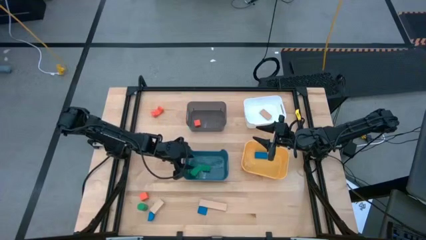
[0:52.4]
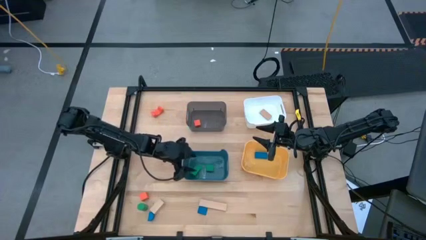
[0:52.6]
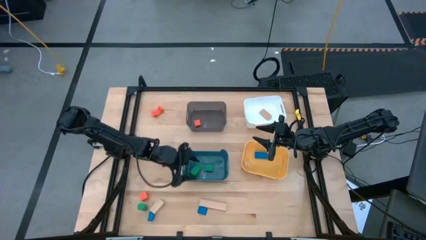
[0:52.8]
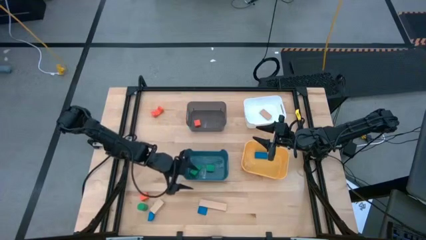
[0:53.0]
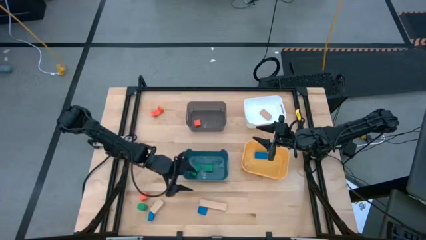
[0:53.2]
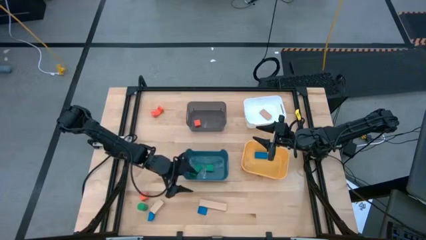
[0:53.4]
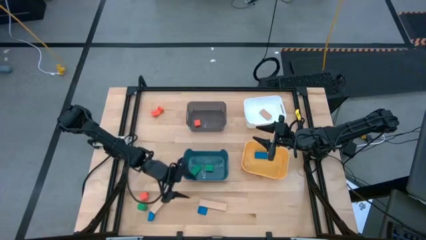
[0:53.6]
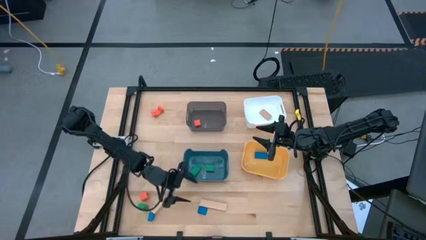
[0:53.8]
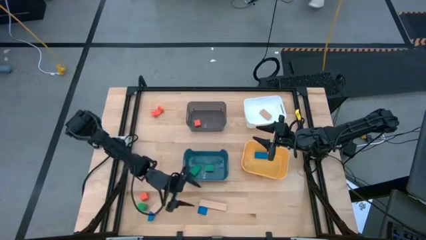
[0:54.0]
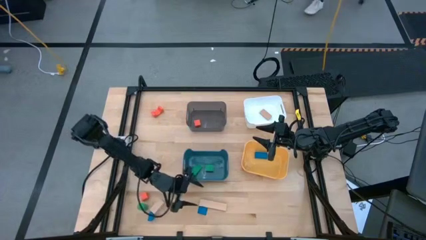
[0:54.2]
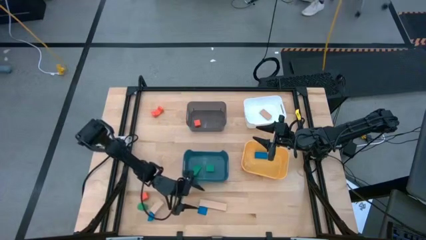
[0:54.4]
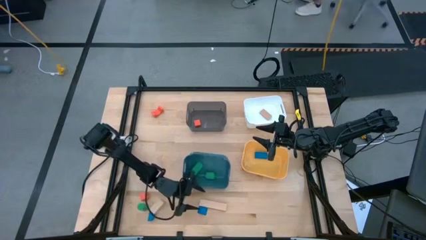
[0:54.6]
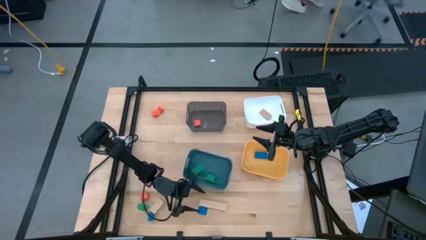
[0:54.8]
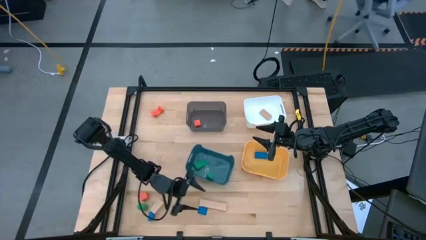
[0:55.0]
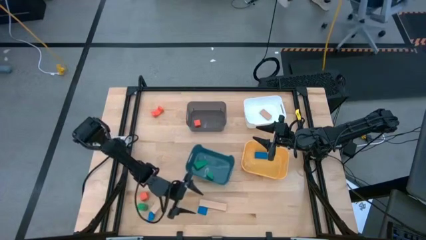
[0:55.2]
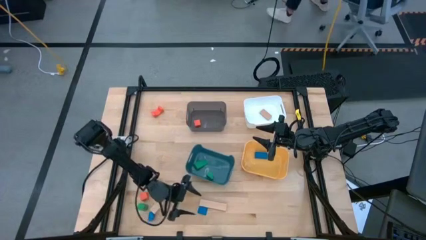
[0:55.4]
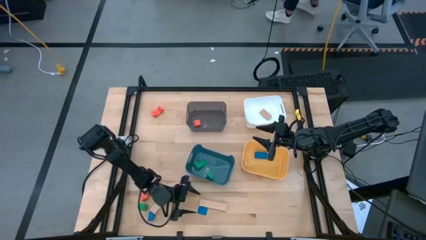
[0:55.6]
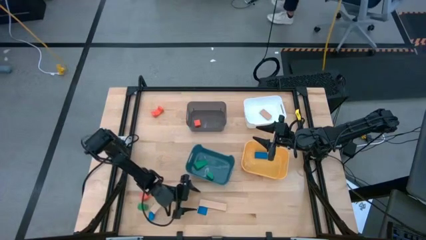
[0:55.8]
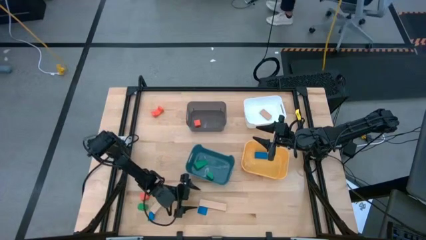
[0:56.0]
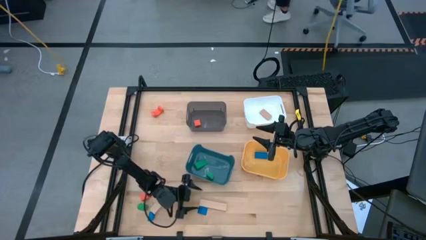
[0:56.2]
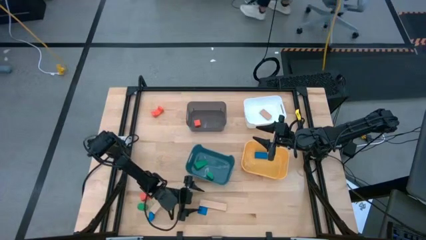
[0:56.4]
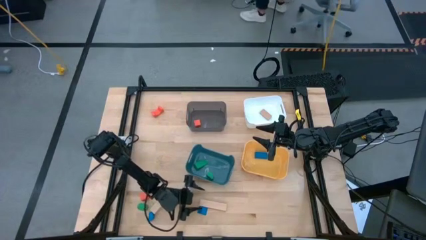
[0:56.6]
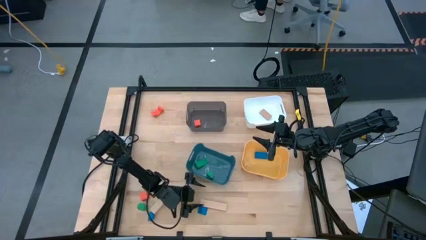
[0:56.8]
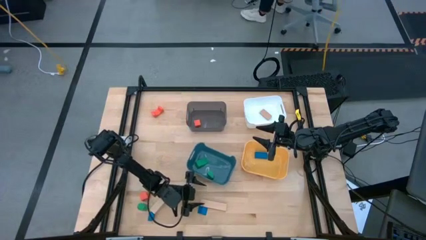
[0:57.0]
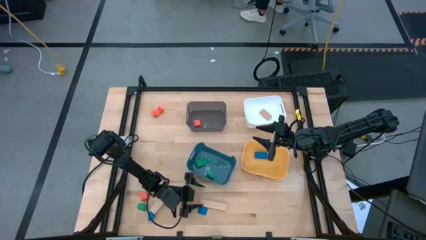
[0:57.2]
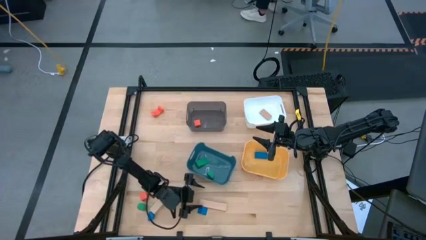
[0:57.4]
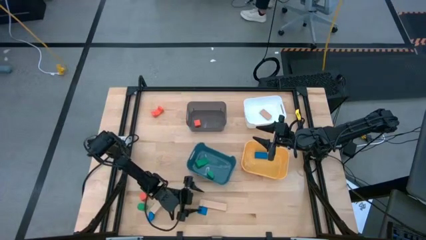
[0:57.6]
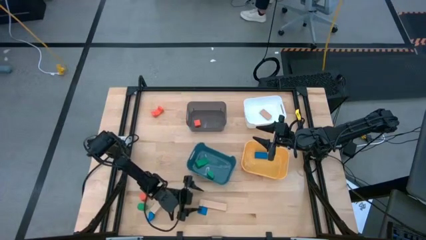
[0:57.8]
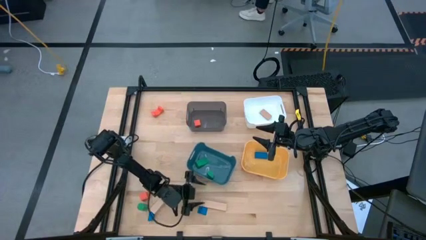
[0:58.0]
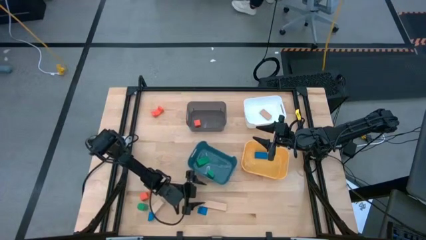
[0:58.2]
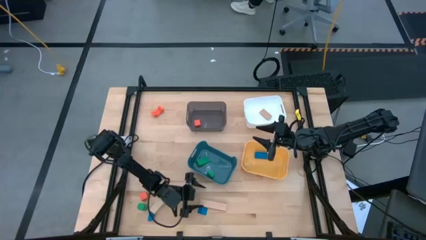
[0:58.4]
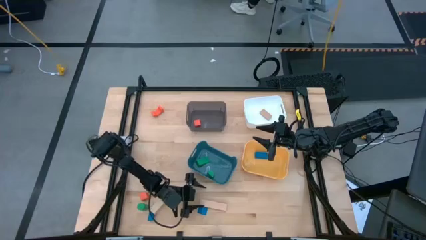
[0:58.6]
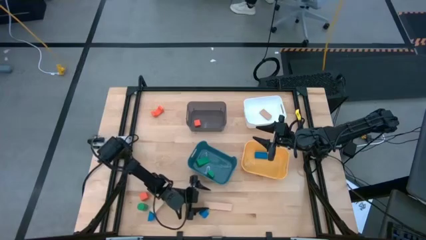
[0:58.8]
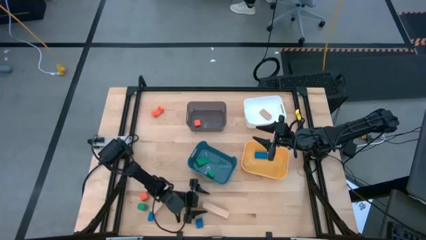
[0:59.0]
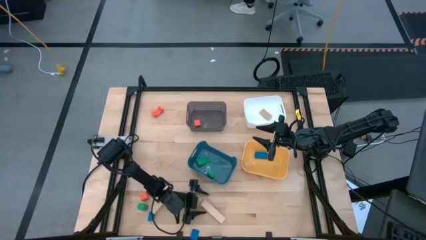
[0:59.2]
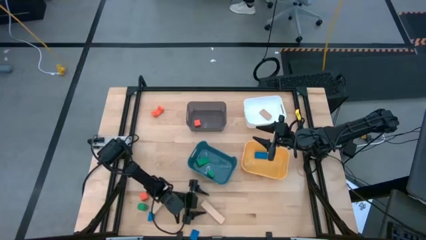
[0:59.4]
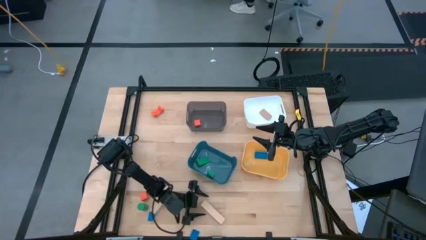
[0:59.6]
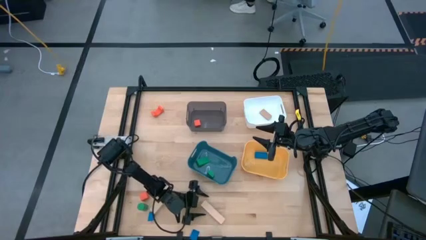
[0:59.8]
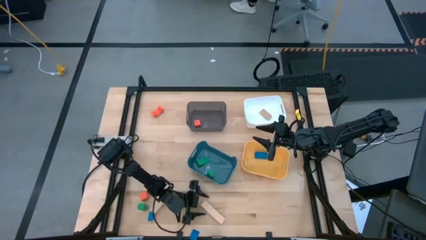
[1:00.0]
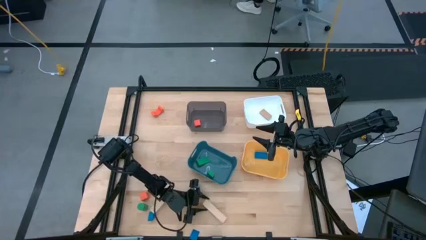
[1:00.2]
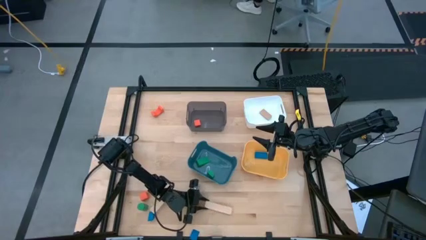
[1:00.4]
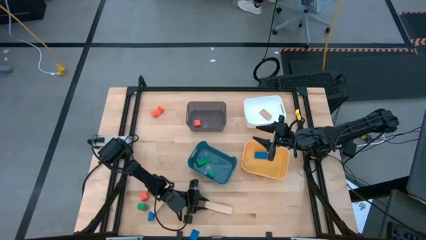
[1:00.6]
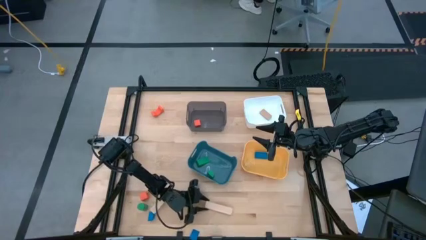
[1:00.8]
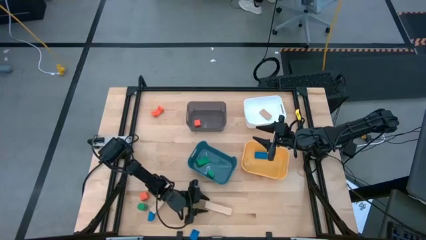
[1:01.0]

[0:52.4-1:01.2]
Task: Sort & place blocks by color
Put the right brown block into the white bin

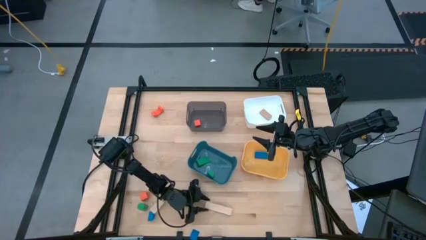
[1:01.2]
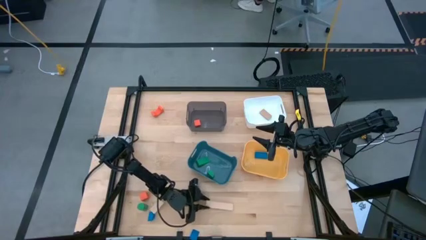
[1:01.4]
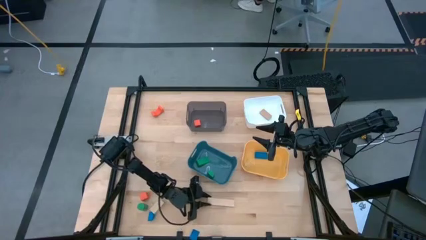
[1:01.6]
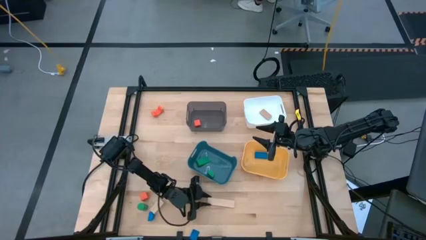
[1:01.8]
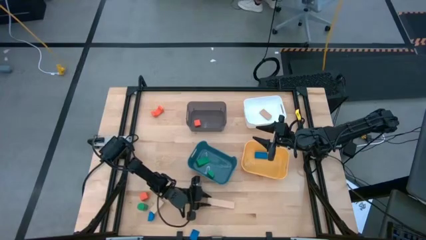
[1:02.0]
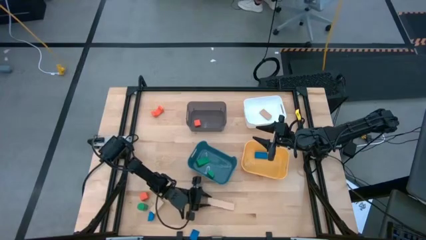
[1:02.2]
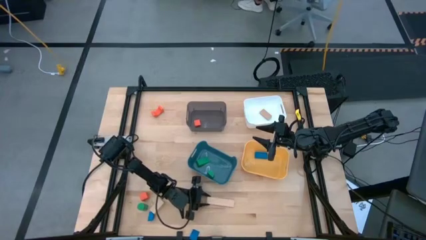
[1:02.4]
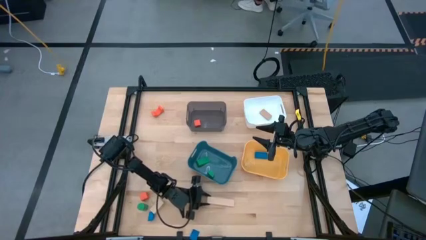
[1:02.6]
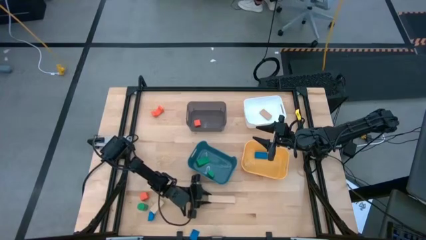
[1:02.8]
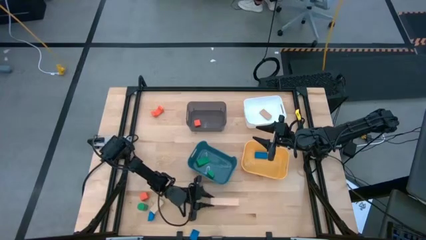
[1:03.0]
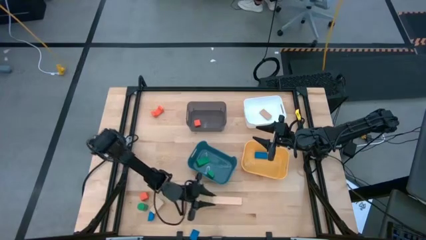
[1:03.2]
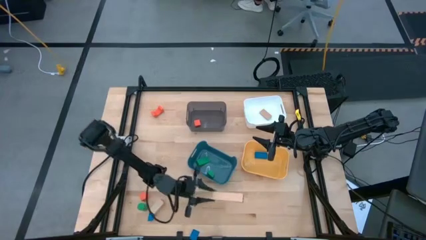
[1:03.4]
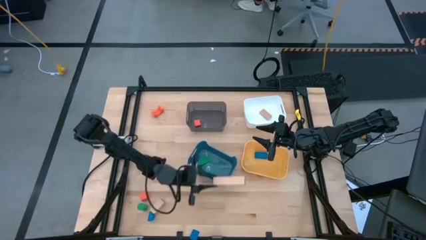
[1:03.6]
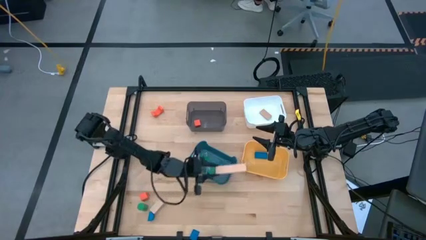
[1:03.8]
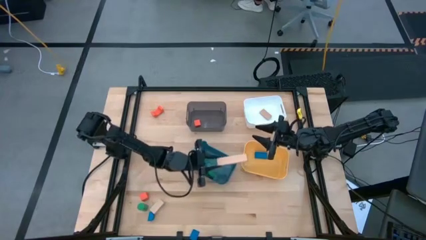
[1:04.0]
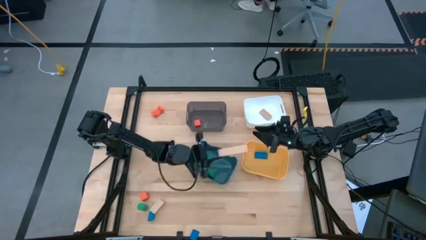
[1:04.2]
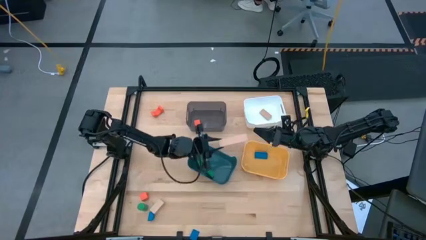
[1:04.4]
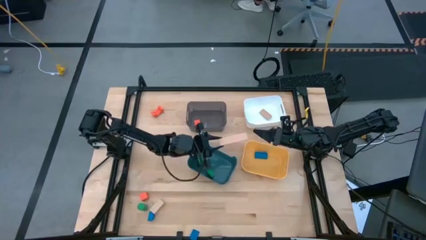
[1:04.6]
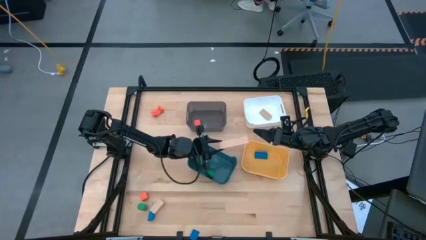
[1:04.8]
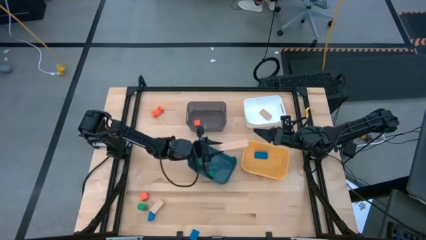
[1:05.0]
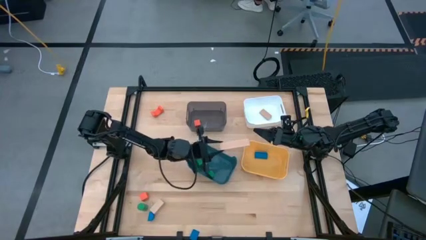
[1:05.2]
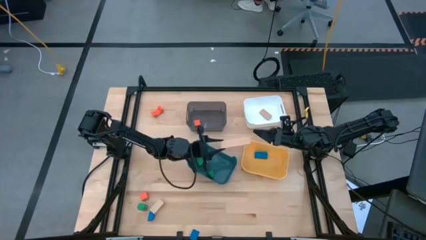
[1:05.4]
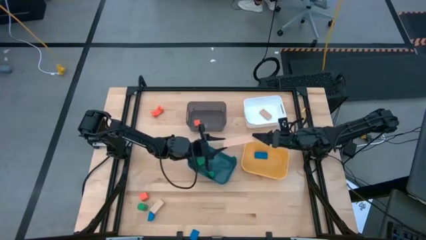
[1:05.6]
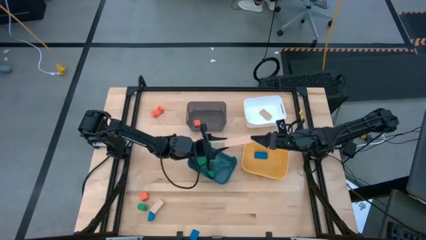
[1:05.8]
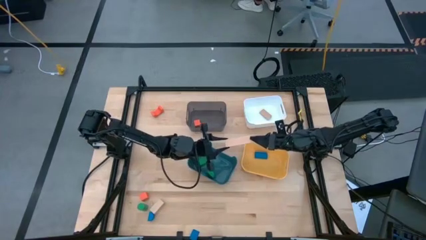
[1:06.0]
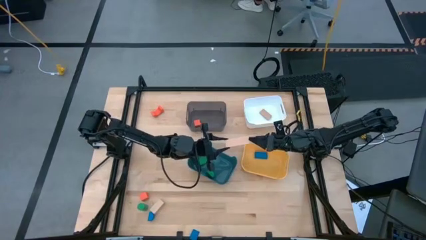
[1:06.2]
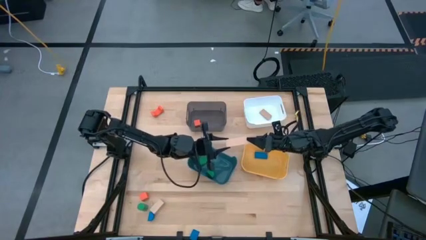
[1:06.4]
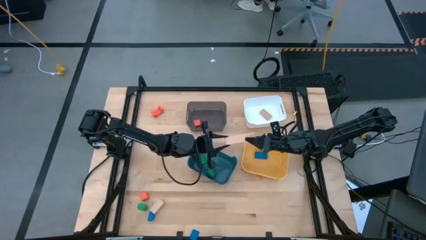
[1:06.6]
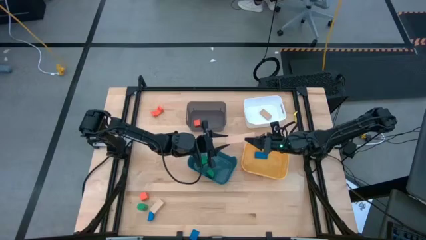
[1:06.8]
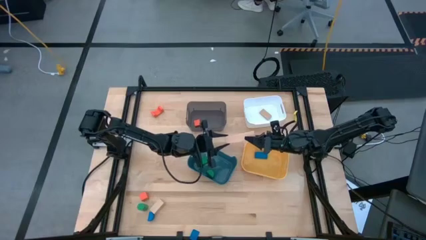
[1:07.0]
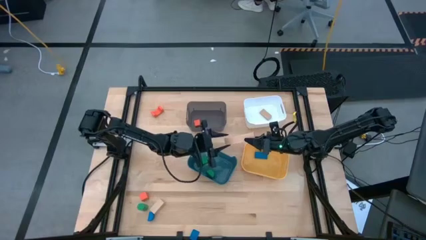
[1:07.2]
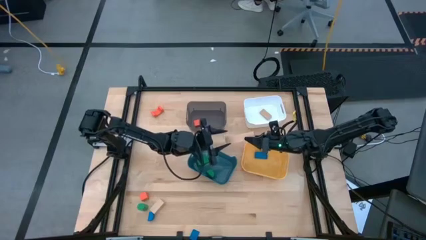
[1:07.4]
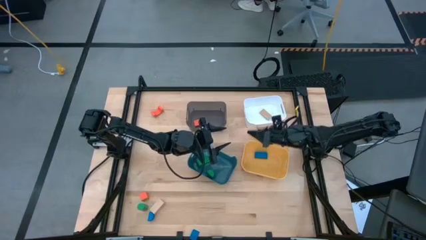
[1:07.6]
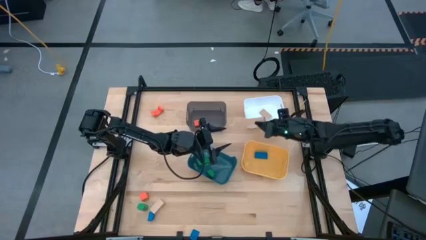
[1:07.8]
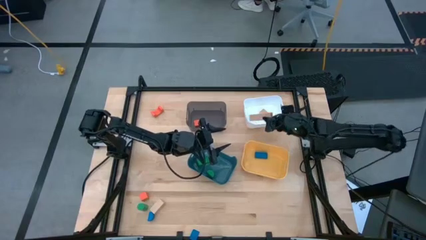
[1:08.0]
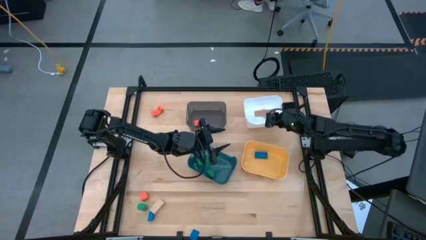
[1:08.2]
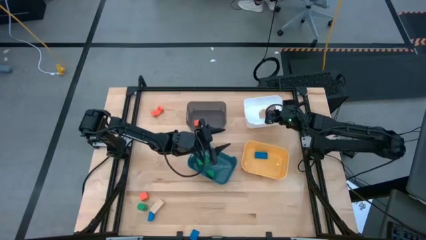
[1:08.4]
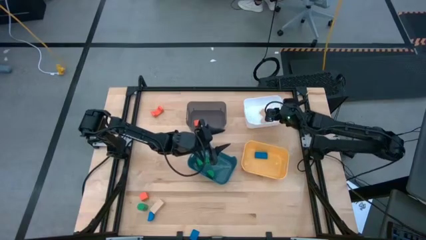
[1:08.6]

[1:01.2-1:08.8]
Put the right brown block into the white bin
